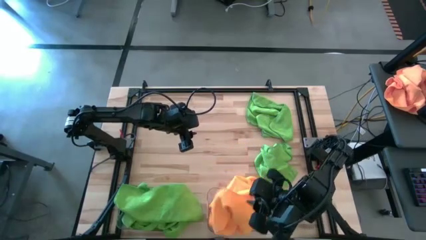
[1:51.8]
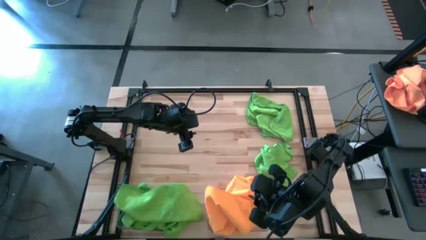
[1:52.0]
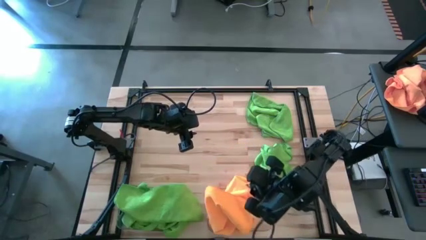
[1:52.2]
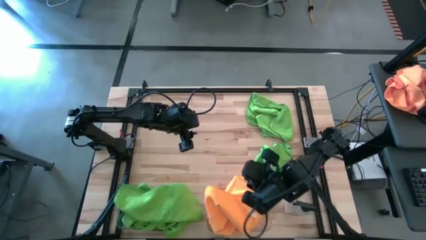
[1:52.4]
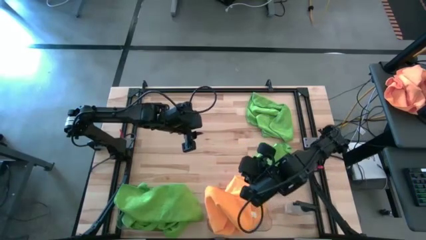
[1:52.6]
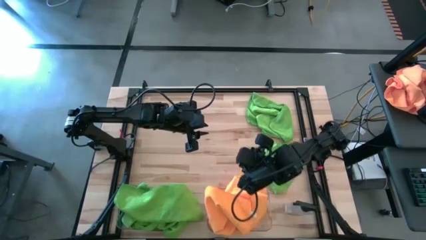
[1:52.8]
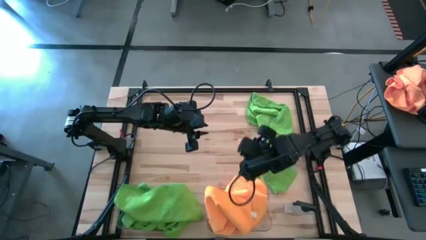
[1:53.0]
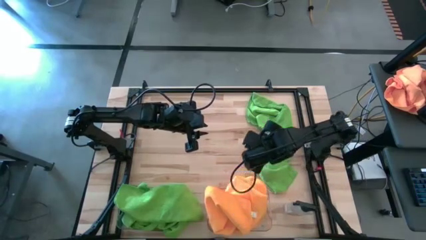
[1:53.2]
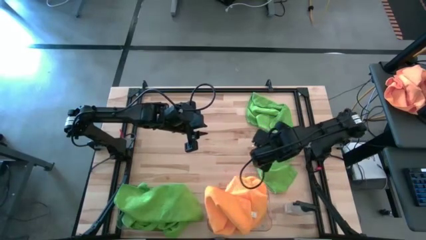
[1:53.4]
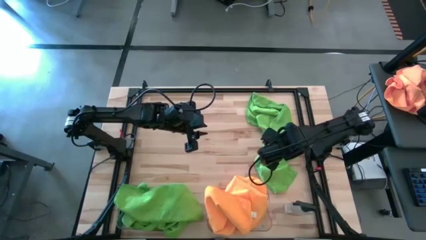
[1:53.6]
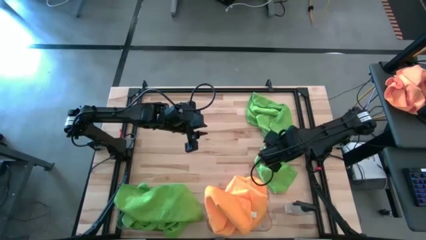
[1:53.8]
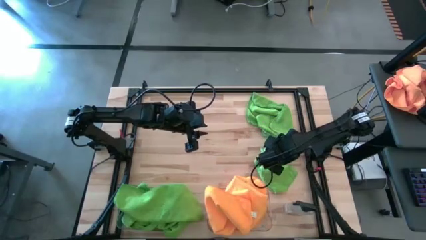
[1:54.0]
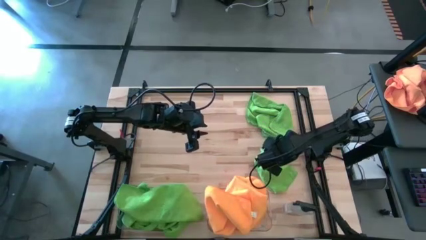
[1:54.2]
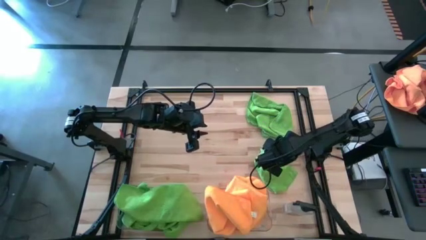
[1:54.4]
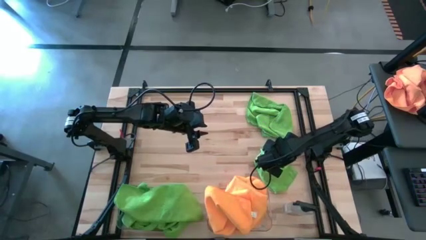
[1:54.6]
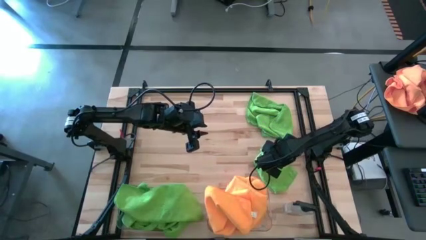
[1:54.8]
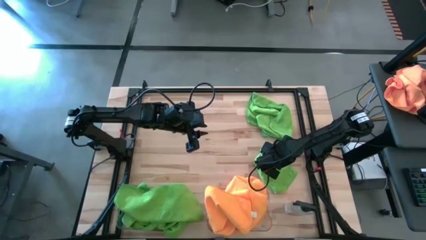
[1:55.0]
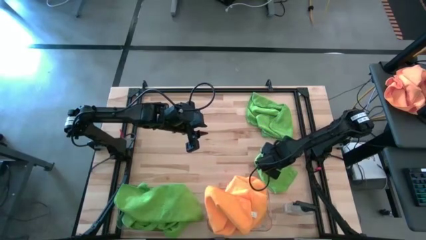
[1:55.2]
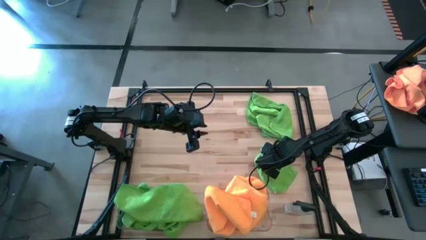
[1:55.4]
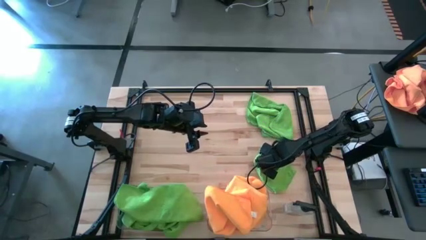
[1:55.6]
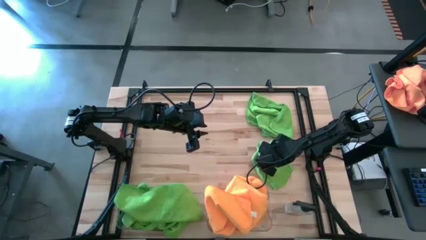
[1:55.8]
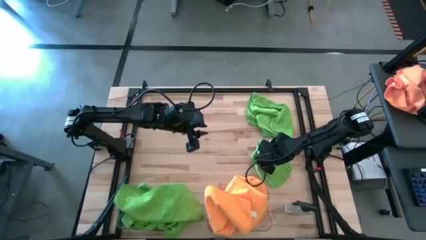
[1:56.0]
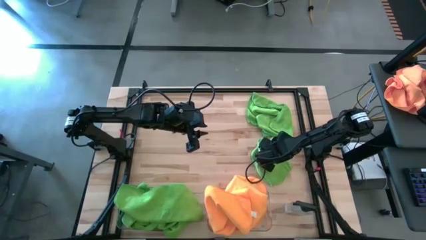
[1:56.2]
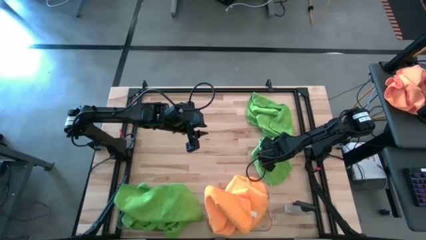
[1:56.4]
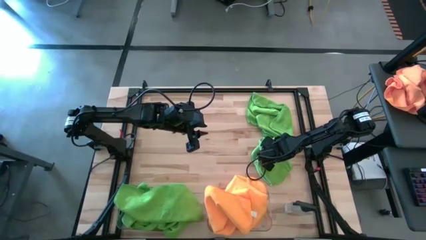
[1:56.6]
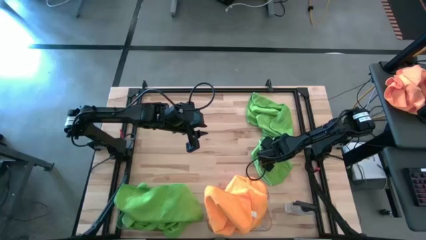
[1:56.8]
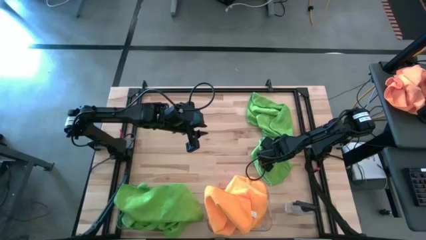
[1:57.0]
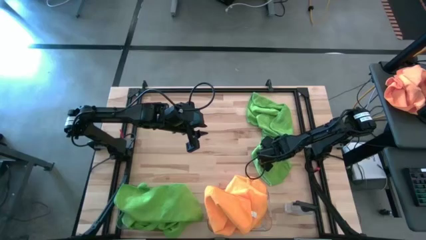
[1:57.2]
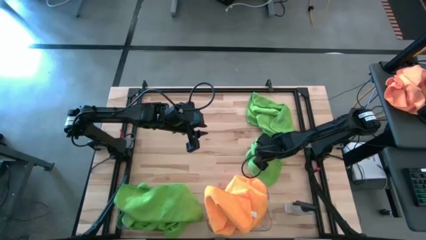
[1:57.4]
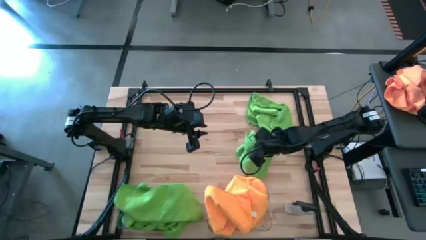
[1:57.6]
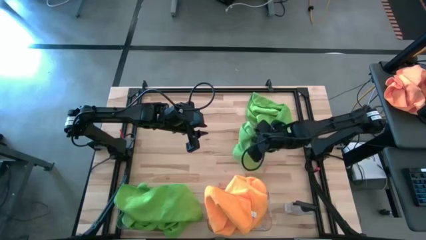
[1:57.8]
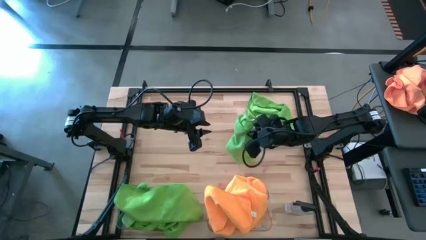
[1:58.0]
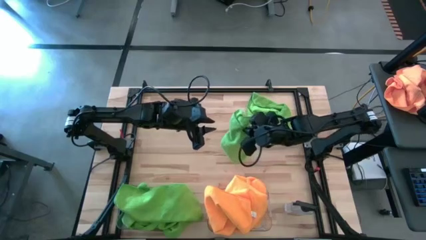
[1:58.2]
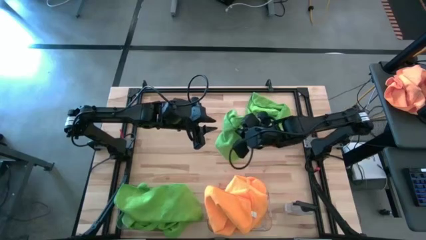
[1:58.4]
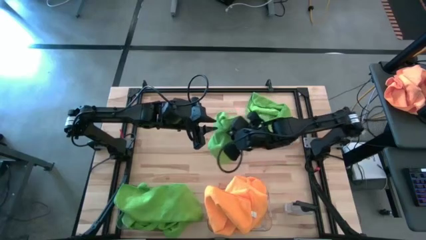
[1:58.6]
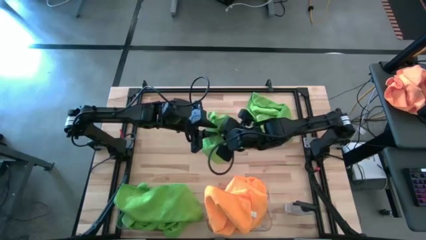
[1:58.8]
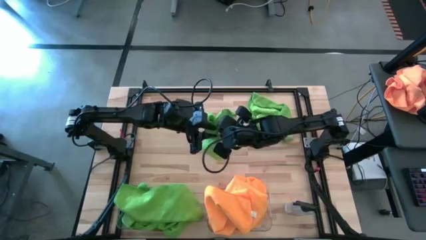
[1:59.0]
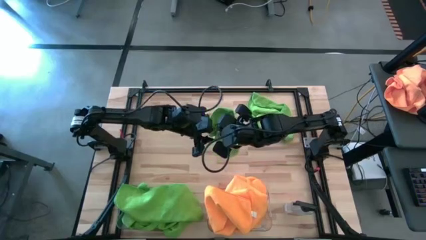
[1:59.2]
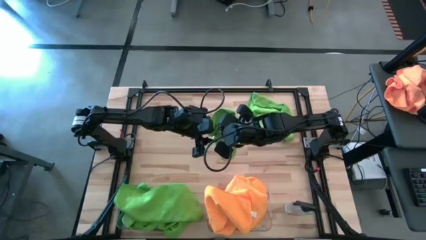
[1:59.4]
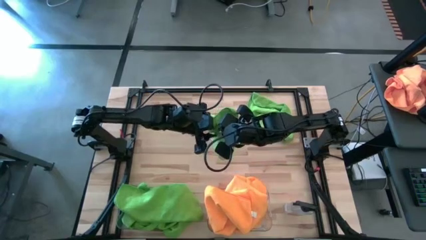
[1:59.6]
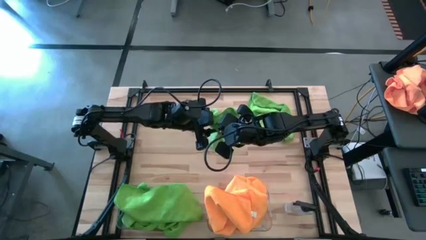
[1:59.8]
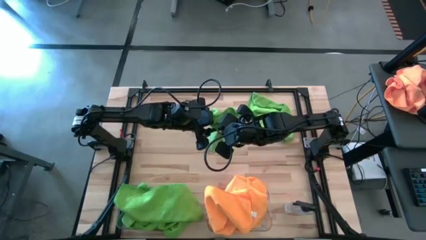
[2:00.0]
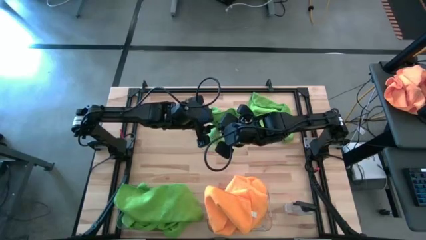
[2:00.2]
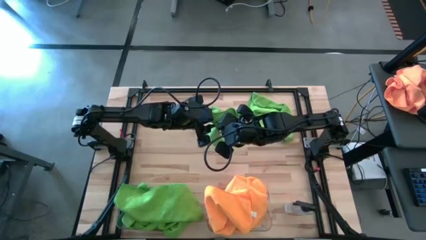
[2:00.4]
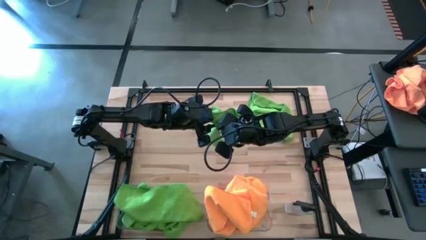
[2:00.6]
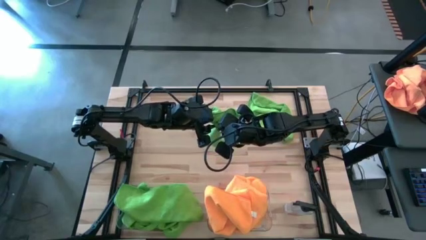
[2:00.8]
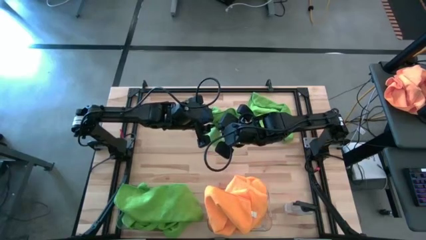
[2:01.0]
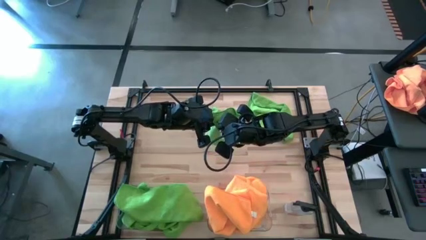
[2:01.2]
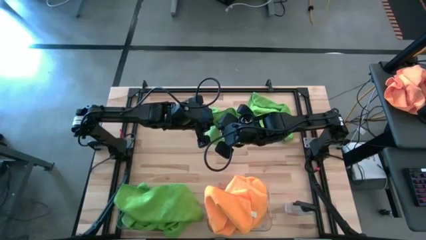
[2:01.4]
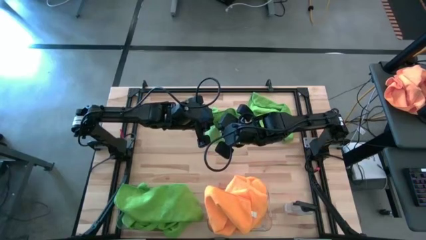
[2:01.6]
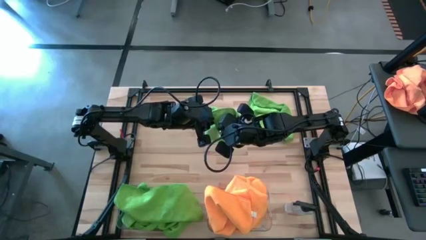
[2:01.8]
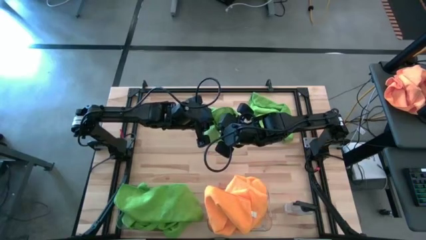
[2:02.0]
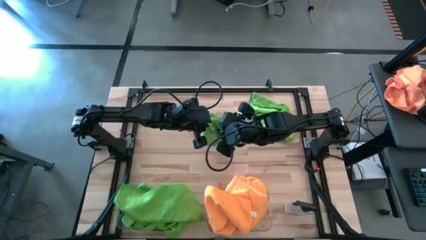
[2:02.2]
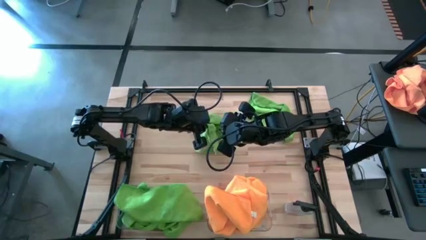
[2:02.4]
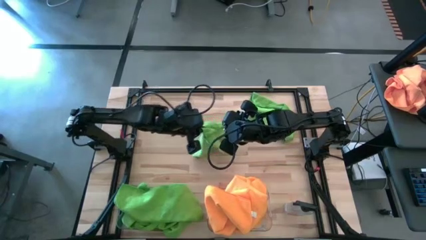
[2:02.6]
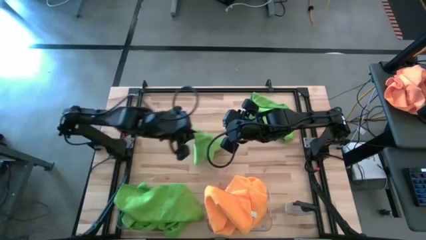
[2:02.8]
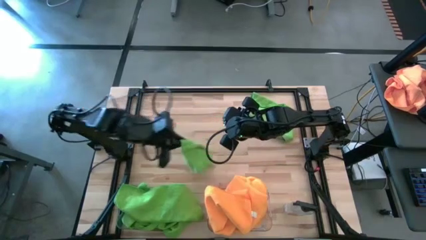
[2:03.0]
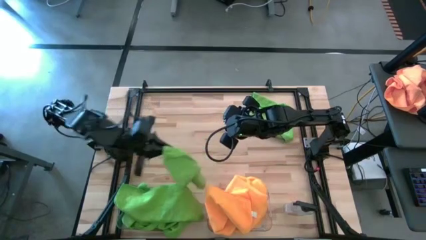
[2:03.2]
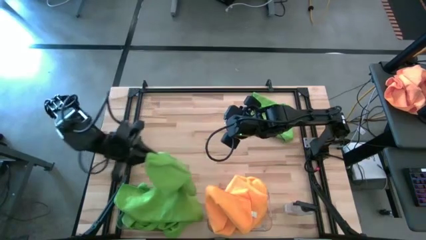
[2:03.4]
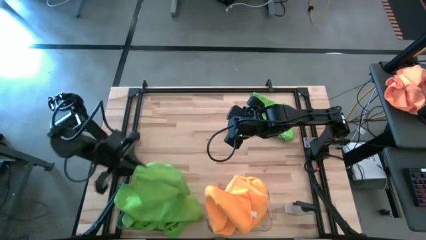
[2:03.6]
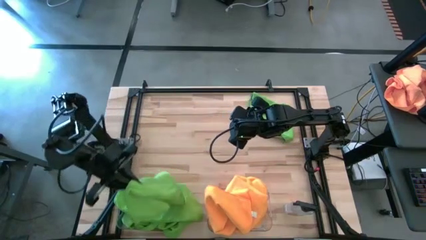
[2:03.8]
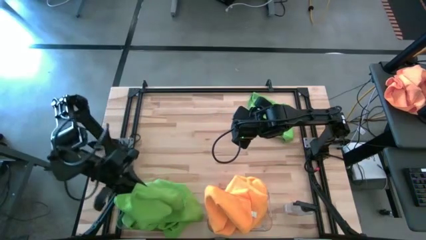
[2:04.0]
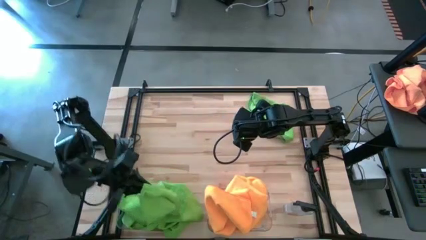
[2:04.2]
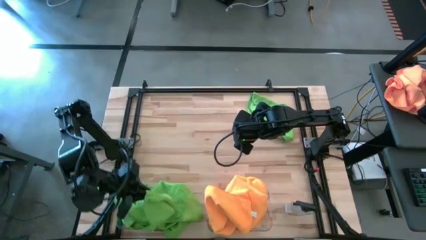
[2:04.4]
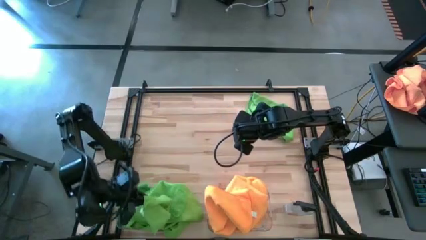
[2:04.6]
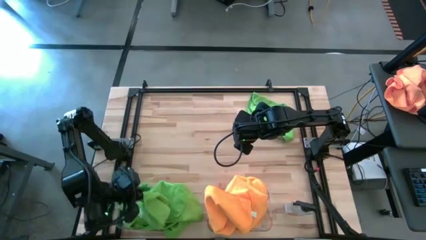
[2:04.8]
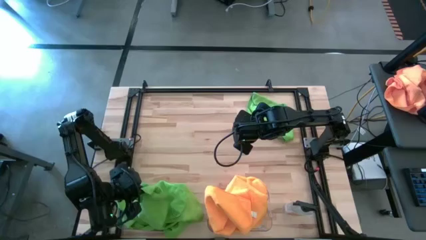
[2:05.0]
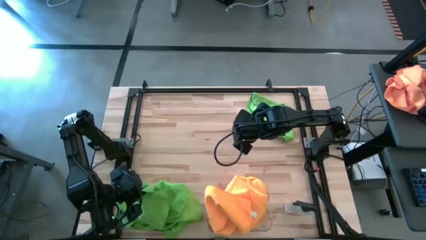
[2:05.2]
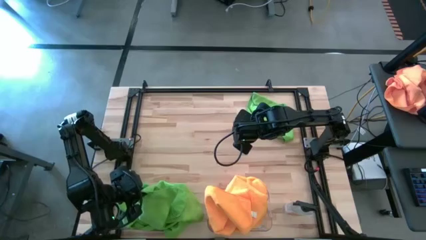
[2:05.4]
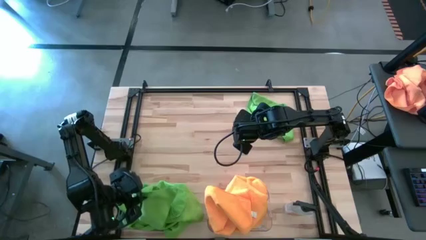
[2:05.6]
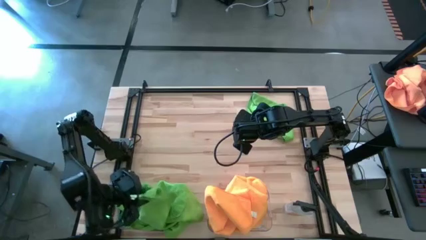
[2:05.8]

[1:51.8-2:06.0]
Task: Sort microfiber towel by color & place in baskets
Put the green towel into the left transparent bin
